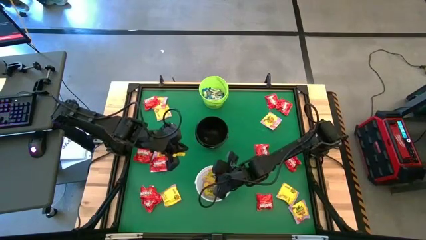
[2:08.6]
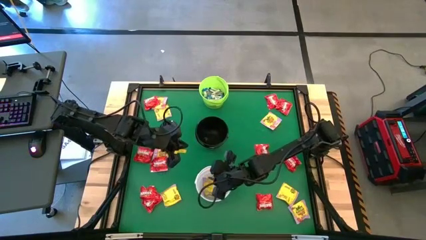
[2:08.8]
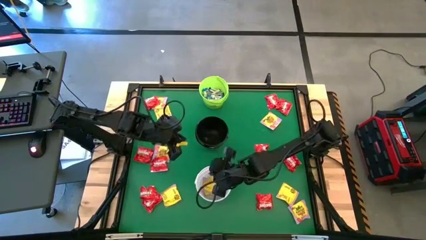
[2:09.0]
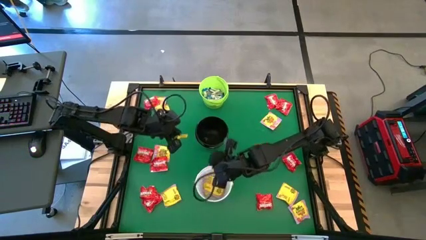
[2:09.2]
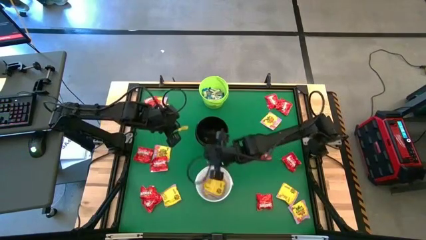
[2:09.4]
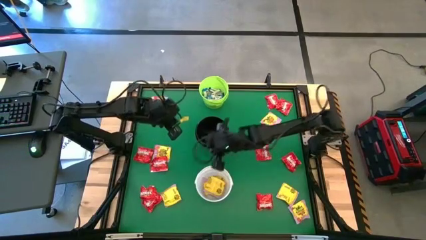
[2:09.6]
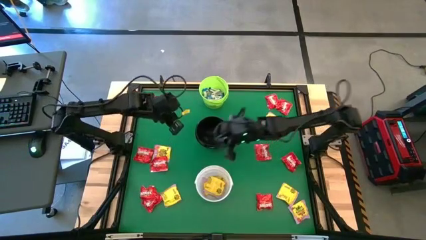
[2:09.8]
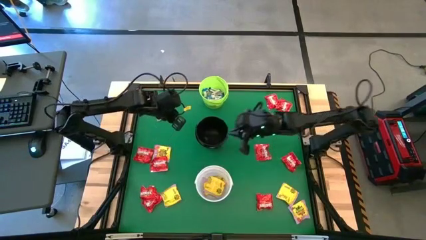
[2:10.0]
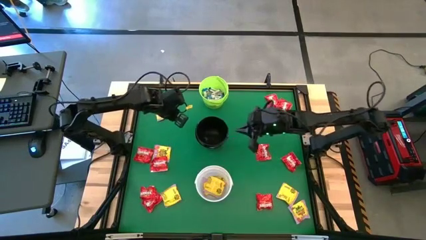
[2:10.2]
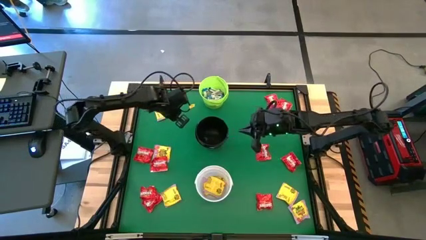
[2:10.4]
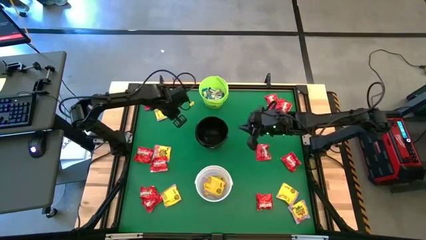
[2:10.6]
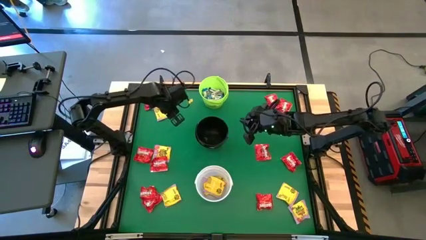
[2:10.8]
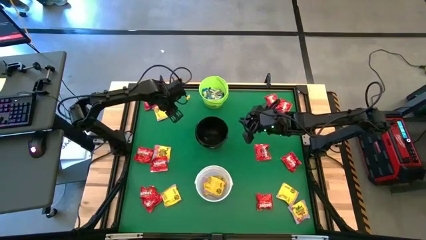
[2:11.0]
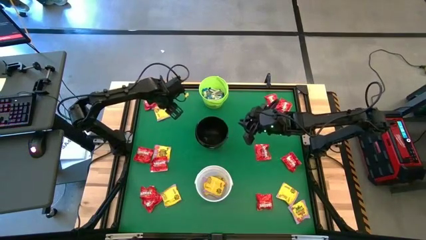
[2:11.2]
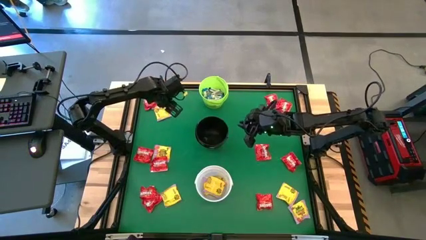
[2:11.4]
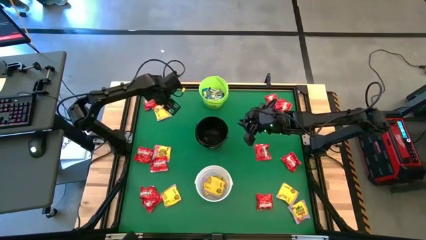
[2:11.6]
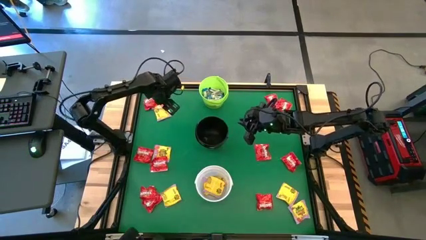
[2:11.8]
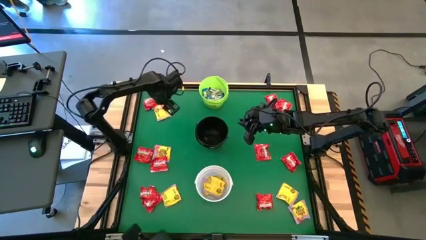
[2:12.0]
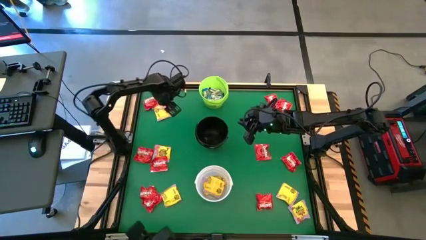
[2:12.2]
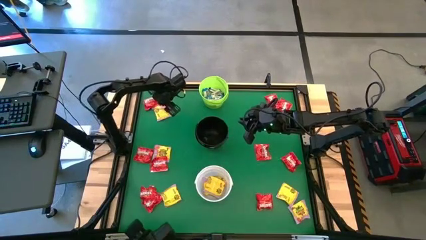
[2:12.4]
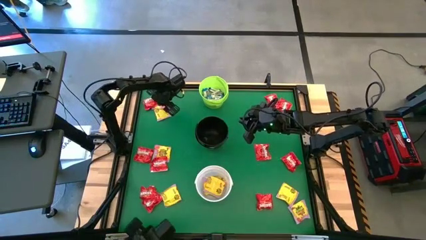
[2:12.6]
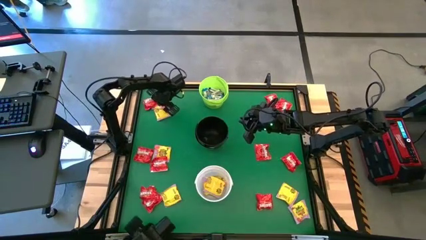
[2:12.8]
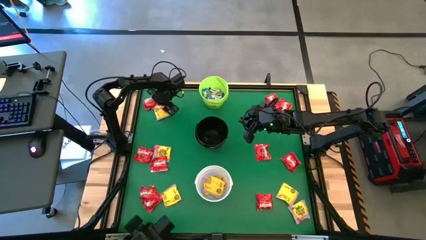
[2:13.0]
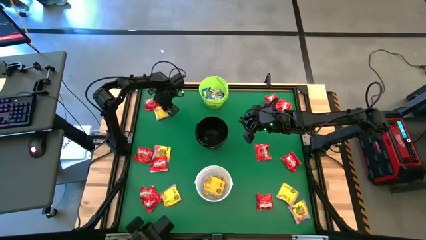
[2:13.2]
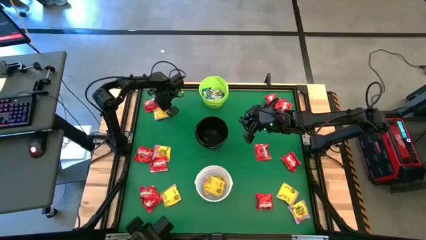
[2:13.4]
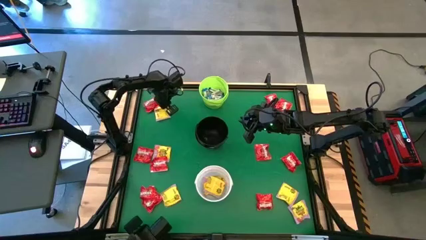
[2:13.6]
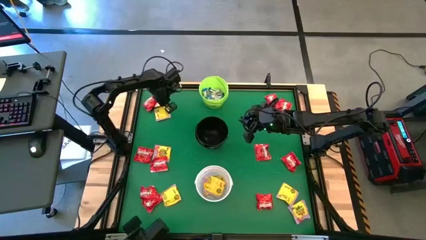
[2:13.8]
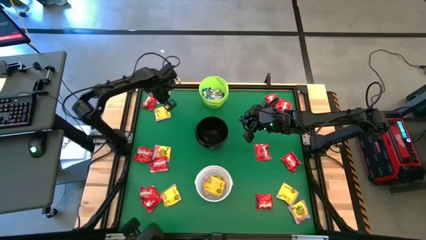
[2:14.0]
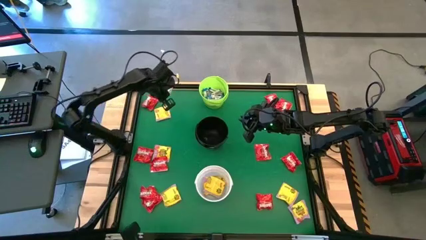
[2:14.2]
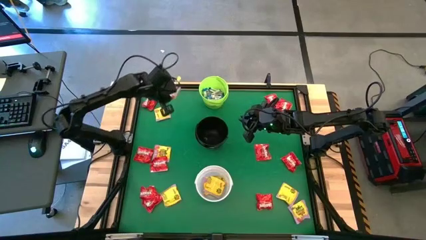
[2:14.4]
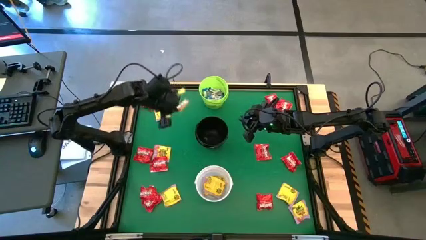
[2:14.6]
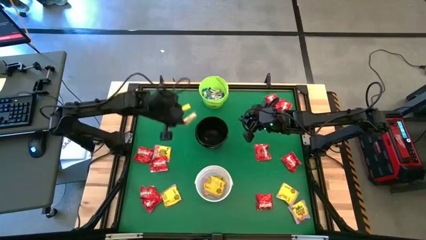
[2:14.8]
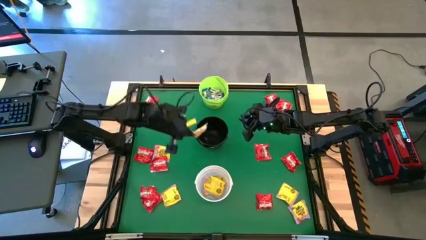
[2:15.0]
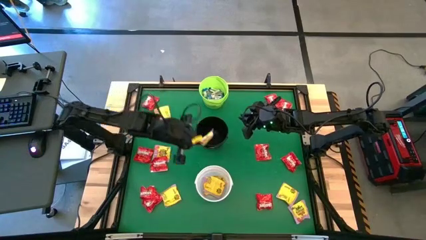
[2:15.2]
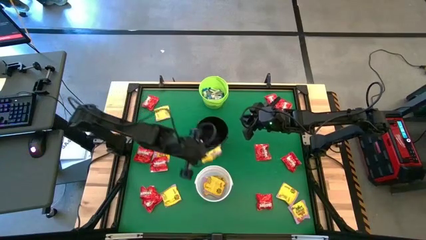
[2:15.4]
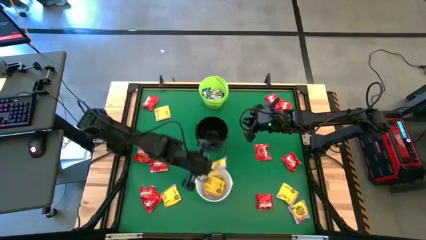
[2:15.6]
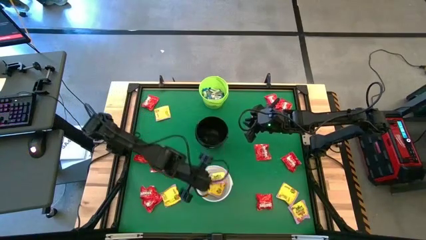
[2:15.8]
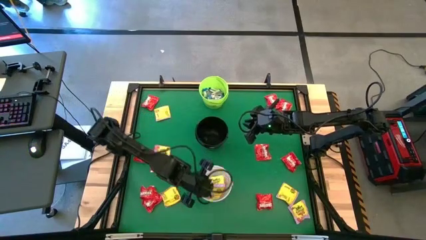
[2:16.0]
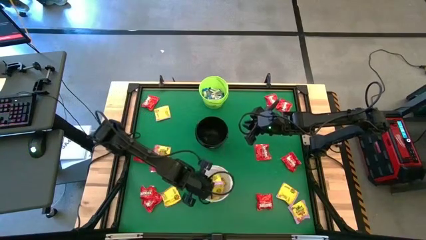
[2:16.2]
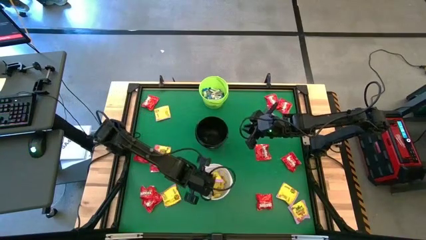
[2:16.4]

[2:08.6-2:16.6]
Task: Sort candy by brand, put in halloween buckets
Put the yellow chocolate into the white bucket

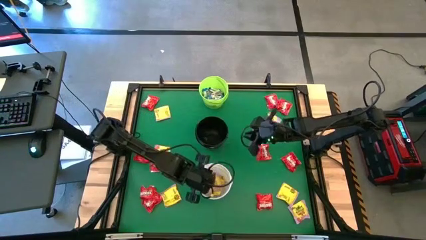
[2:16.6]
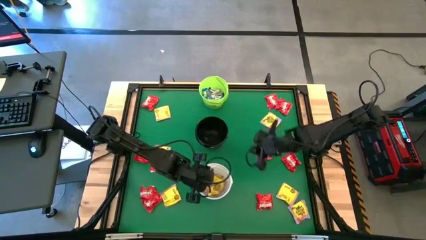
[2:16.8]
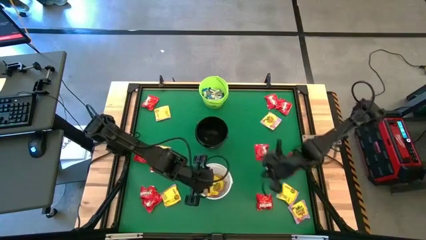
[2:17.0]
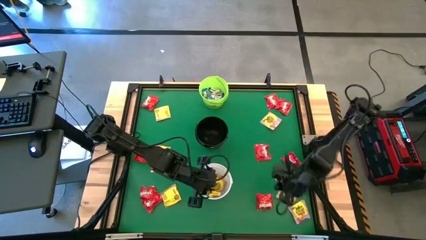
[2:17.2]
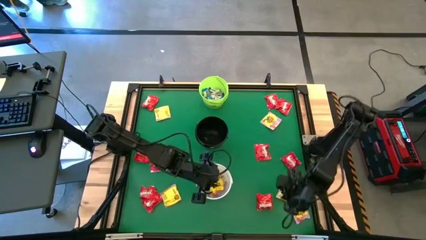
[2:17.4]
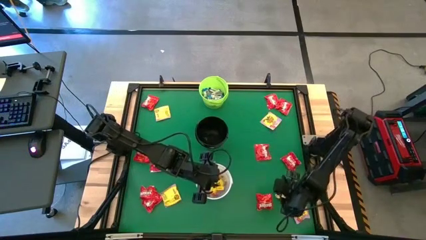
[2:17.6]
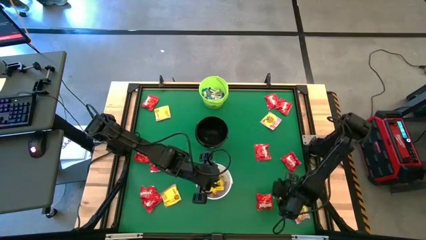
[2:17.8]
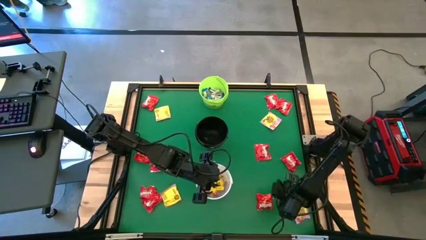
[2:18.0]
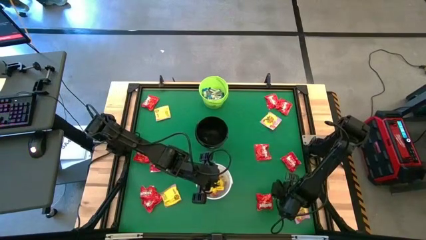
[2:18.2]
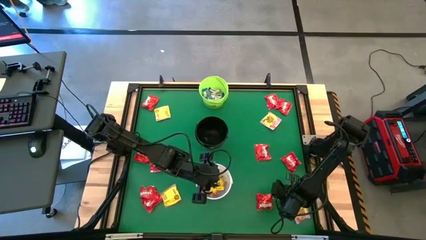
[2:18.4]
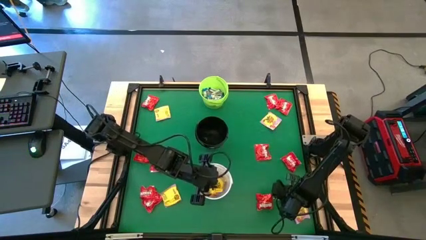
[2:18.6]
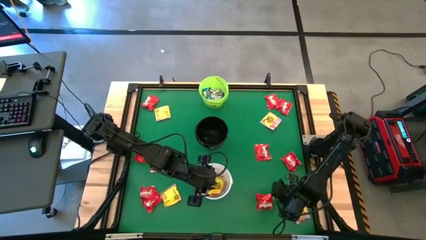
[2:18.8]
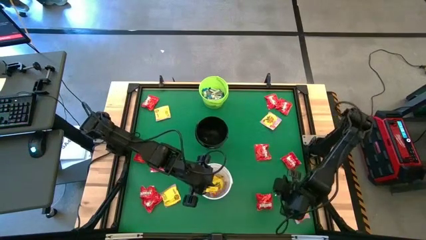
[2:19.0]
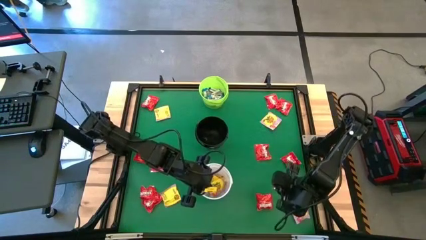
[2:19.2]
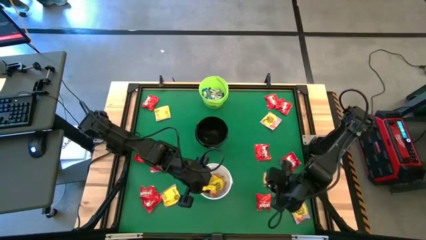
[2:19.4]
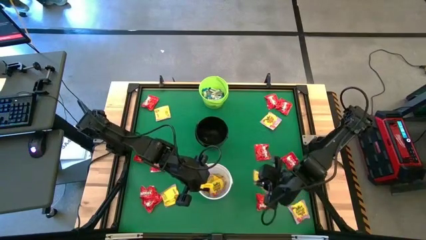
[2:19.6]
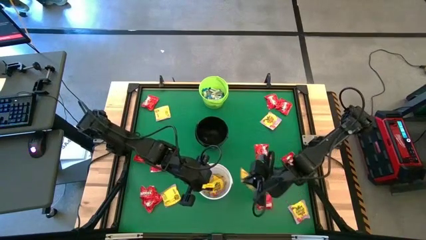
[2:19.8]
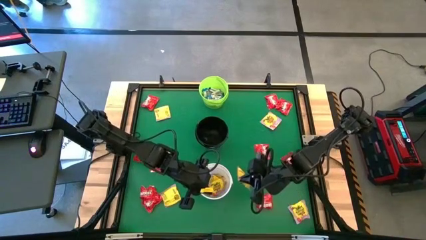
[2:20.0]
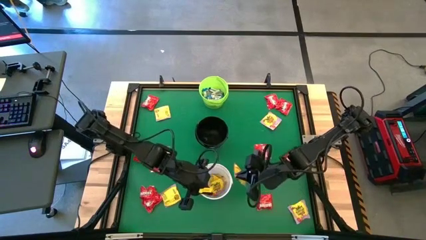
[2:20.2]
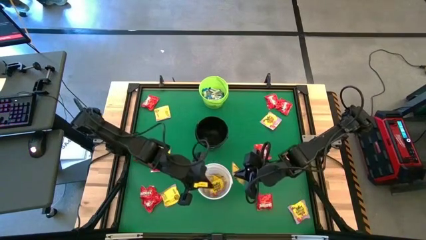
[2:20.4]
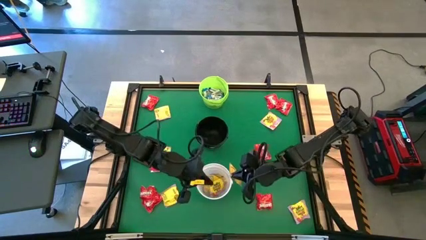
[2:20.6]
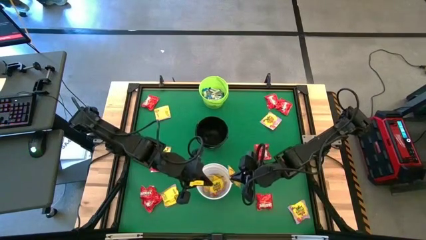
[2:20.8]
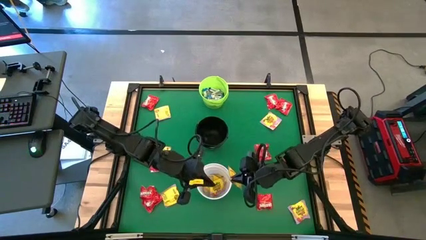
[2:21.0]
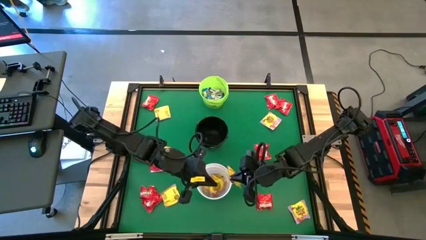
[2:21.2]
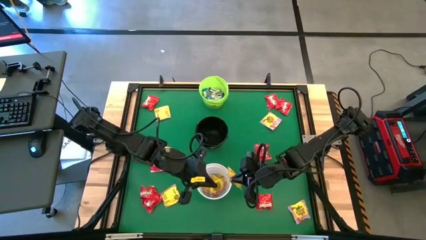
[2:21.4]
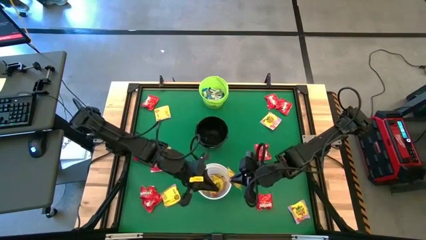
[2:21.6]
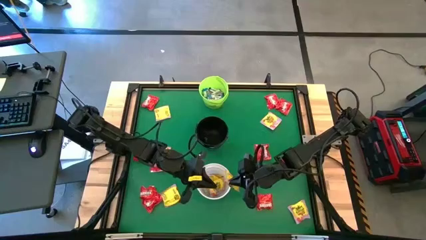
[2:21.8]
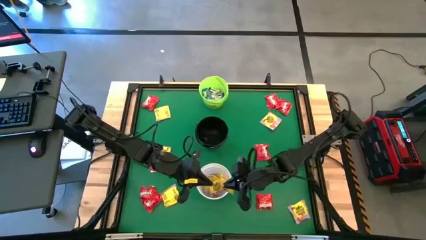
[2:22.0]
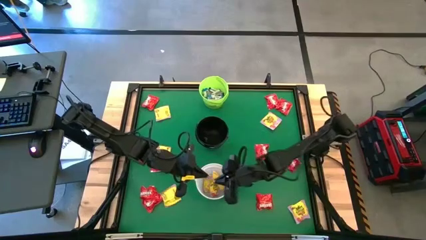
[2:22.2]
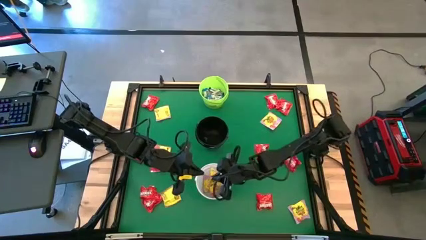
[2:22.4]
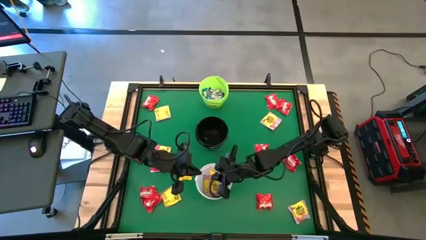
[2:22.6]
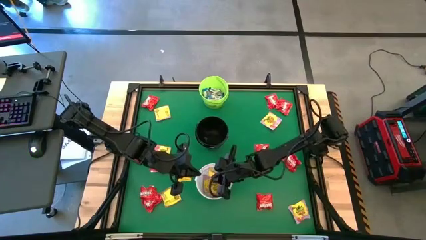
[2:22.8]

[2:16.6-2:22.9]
Put the yellow chocolate into the white bucket

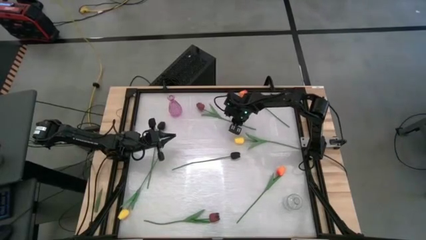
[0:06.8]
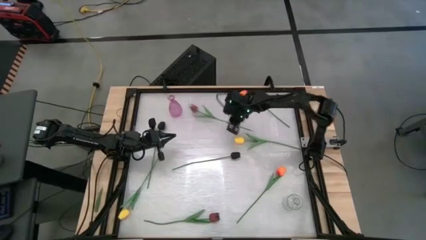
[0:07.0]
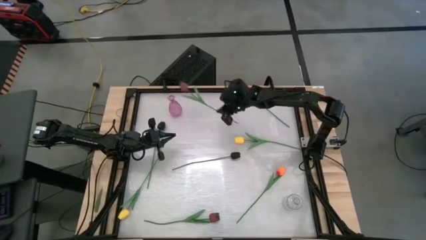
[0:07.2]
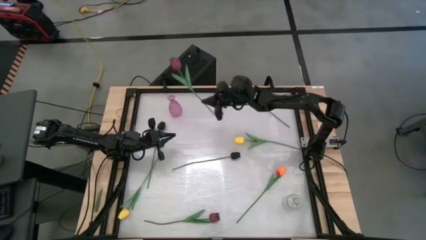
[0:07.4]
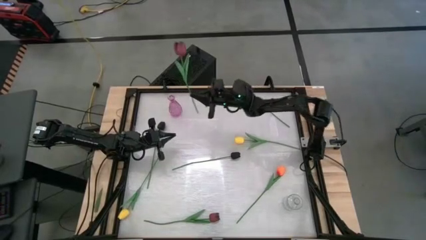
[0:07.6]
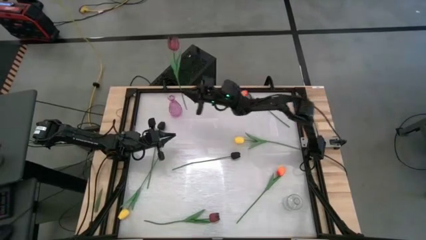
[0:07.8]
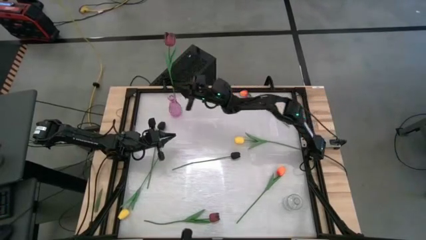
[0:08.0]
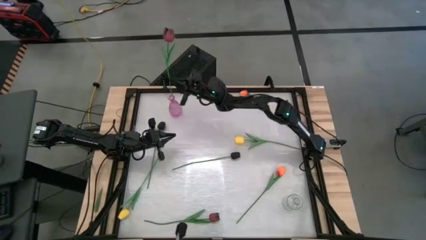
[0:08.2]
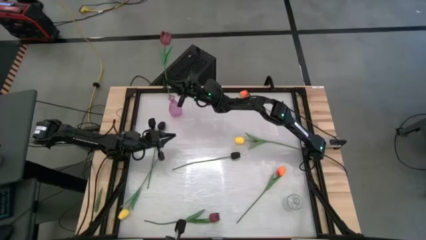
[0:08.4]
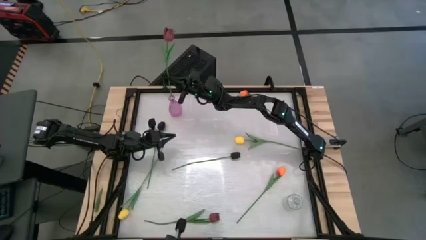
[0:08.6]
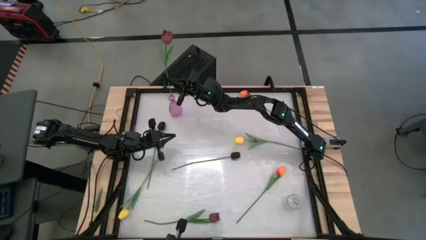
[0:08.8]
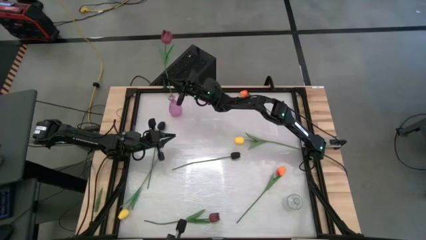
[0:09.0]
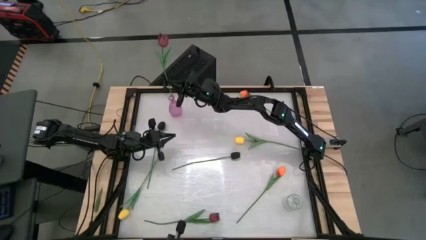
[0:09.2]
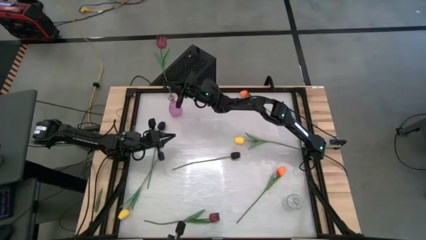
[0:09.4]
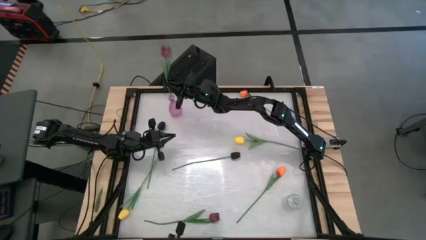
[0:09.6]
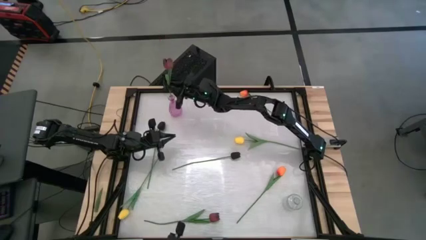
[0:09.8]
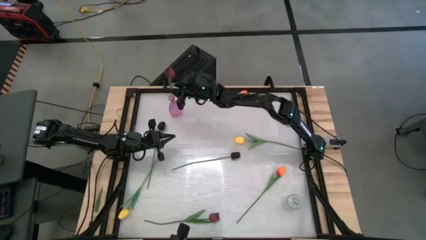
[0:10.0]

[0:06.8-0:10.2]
Task: Sort flowers into vase by color
Put the top red flower into the purple vase
